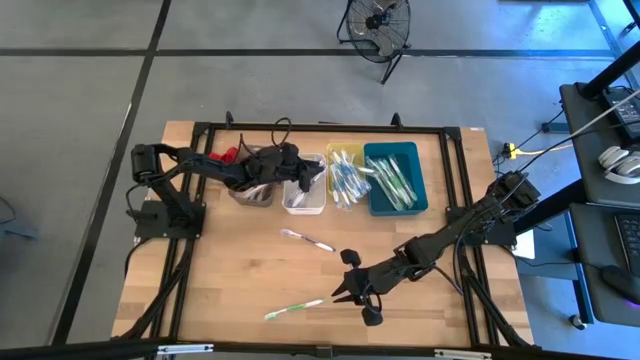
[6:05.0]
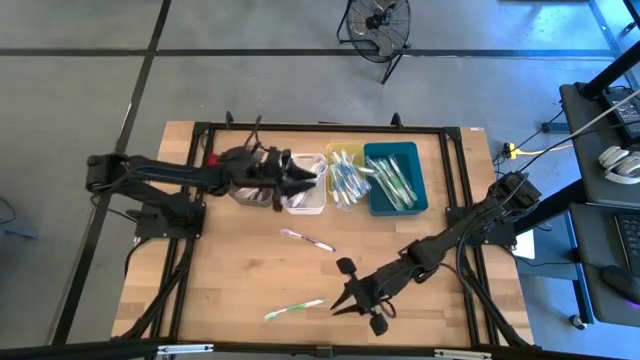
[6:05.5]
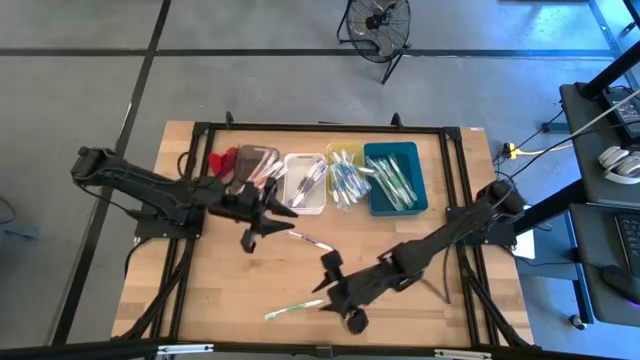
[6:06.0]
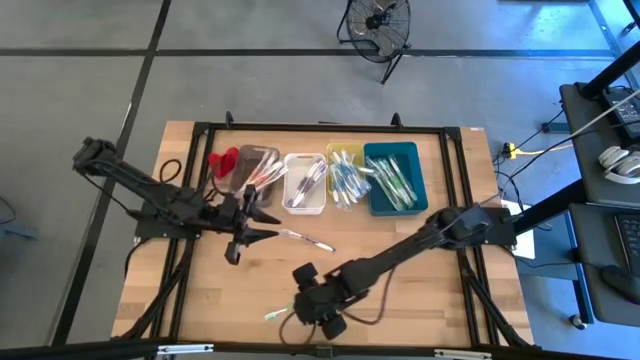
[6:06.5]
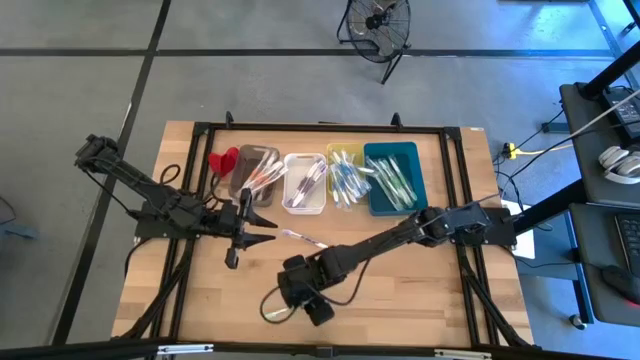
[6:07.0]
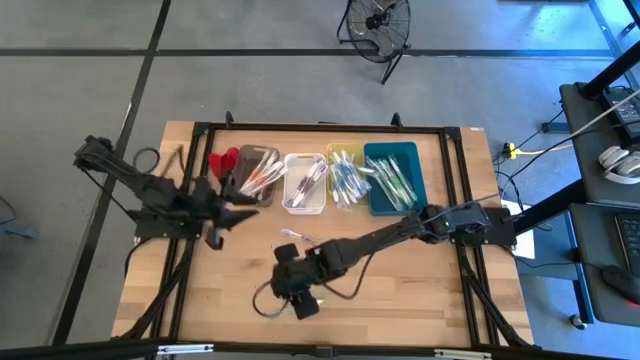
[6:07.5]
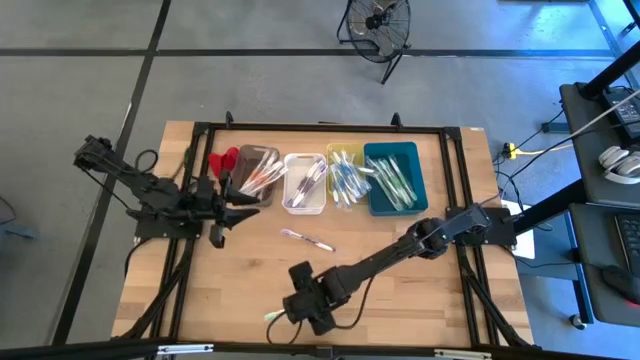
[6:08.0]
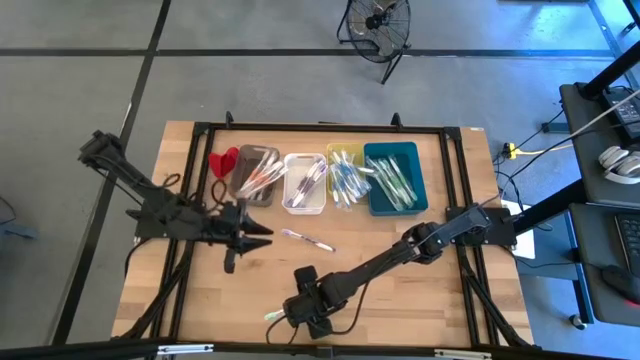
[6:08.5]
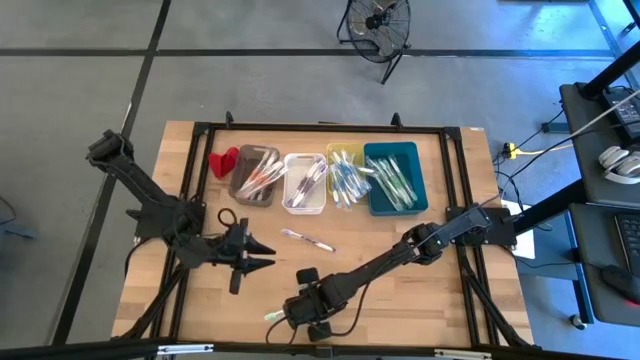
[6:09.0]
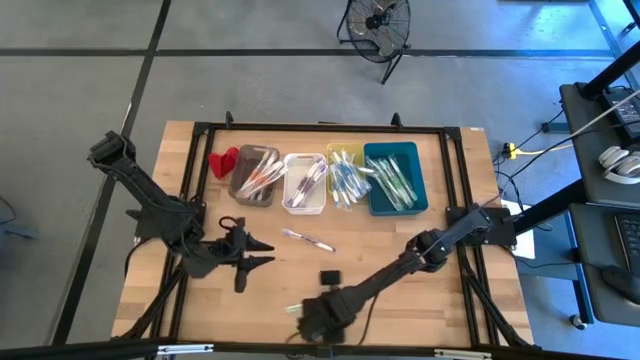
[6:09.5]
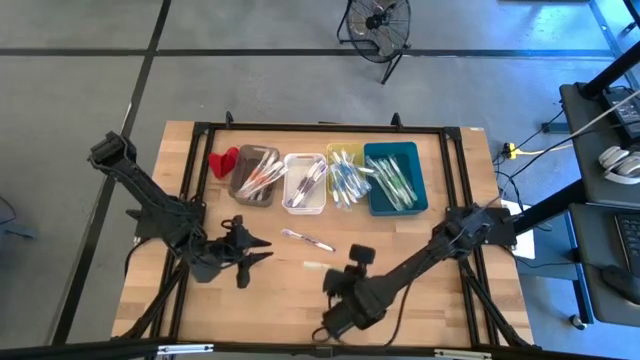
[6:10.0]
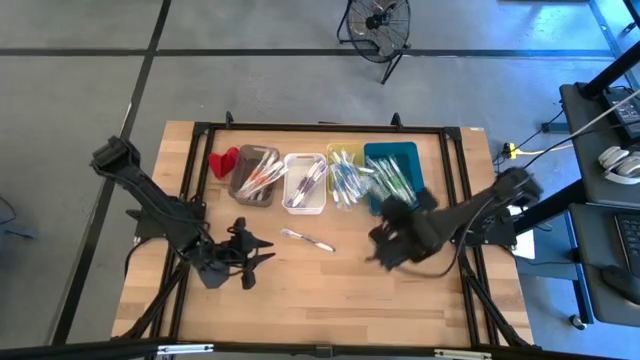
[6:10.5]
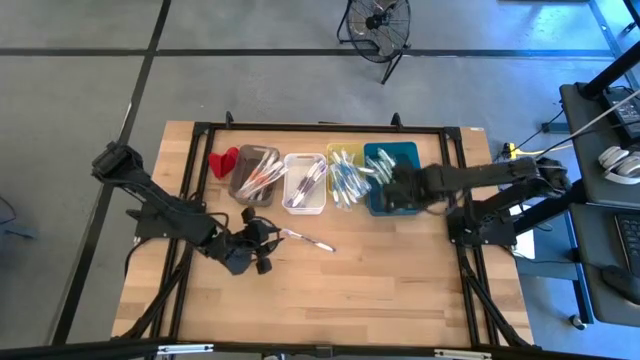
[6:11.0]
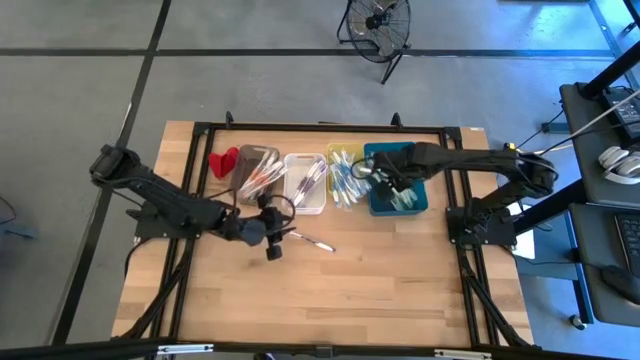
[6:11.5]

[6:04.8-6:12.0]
Task: Pick & Place Toothbrushes
Put the green toothbrush into the blue bin

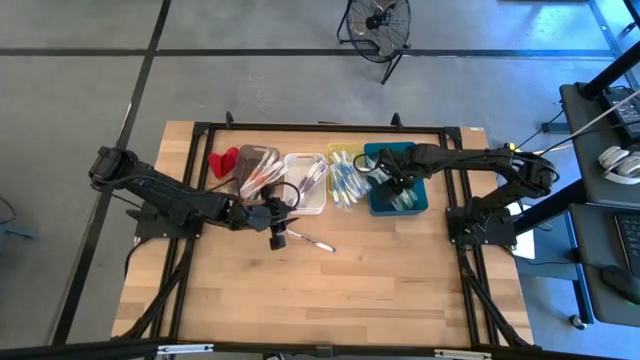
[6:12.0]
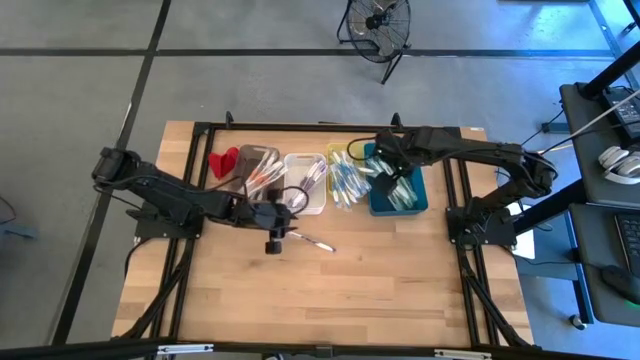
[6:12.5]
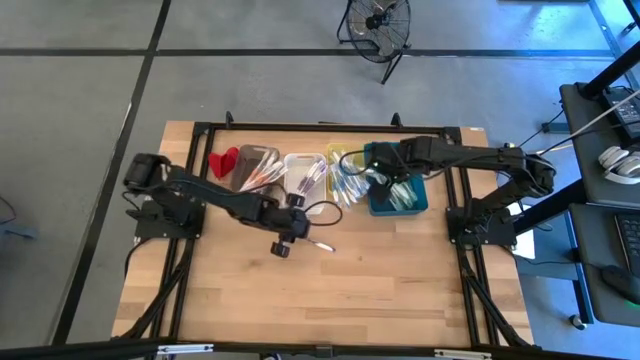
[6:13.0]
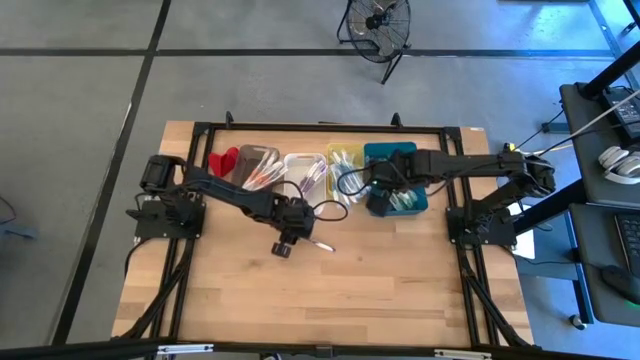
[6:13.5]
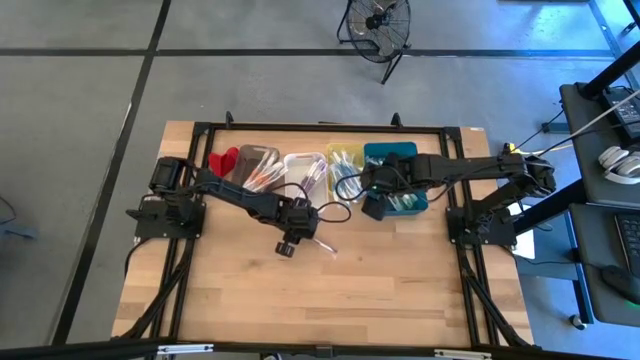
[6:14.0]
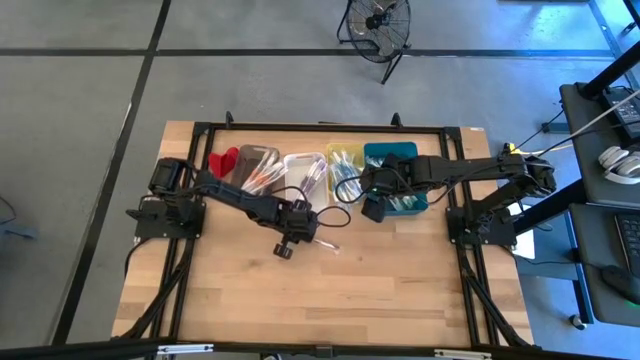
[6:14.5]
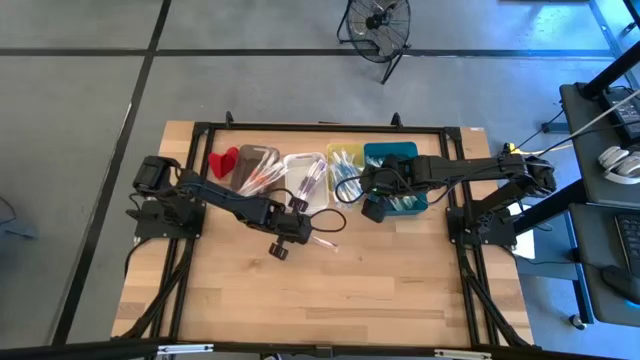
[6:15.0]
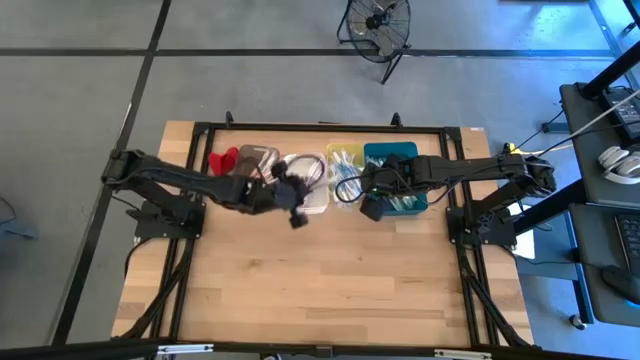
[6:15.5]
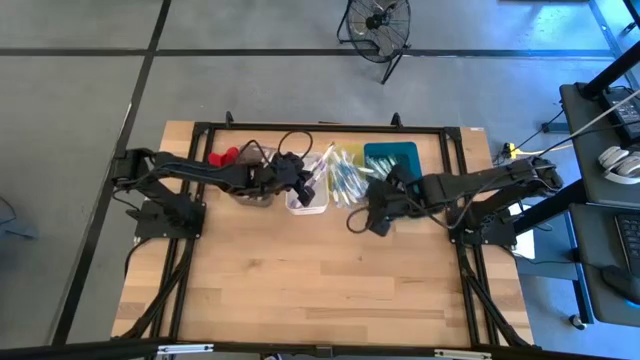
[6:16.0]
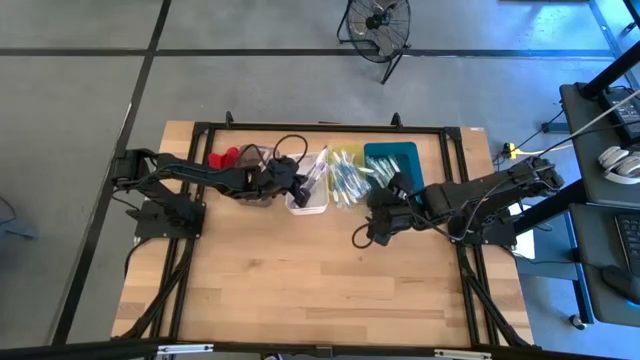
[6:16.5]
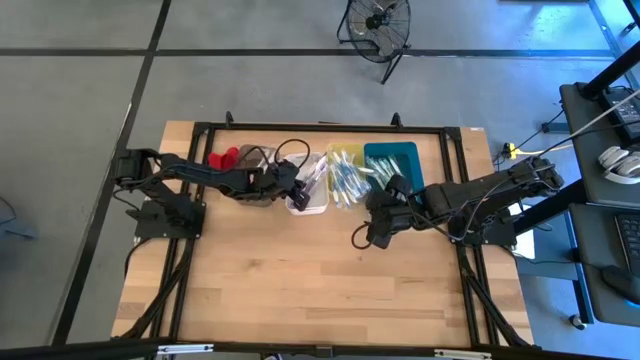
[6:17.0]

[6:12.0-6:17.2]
Put the purple toothbrush into the white bin

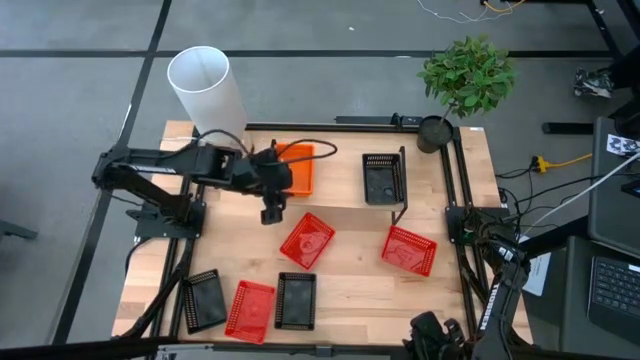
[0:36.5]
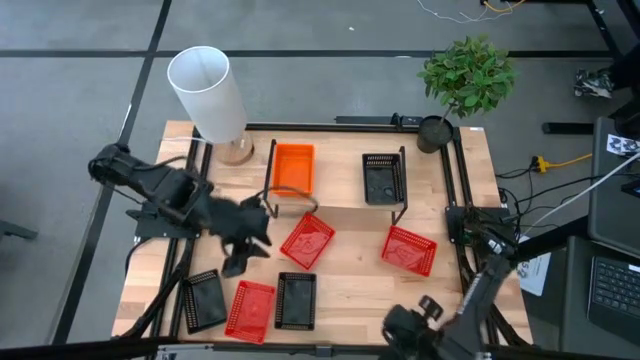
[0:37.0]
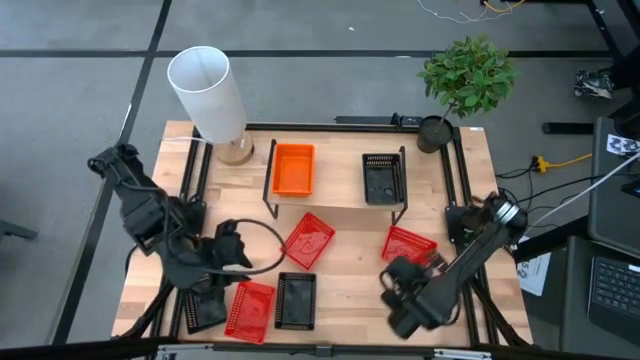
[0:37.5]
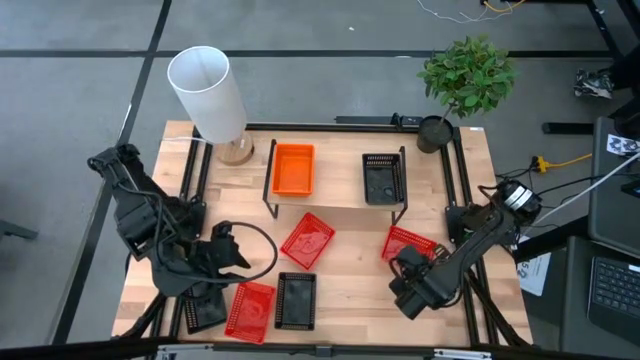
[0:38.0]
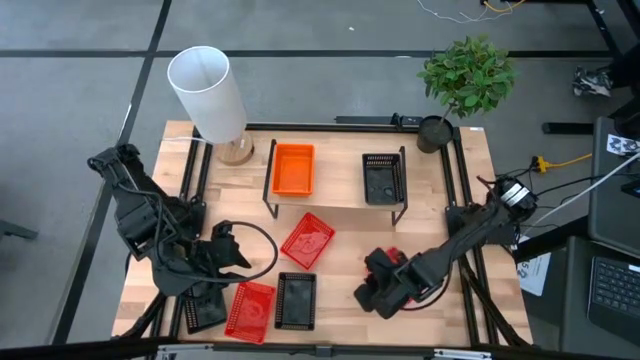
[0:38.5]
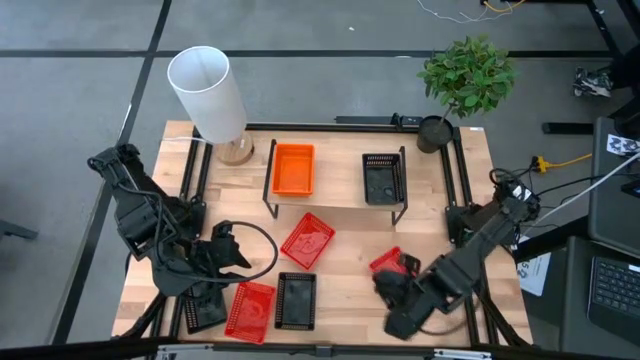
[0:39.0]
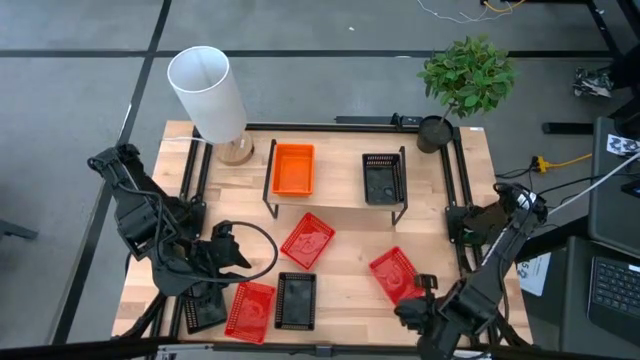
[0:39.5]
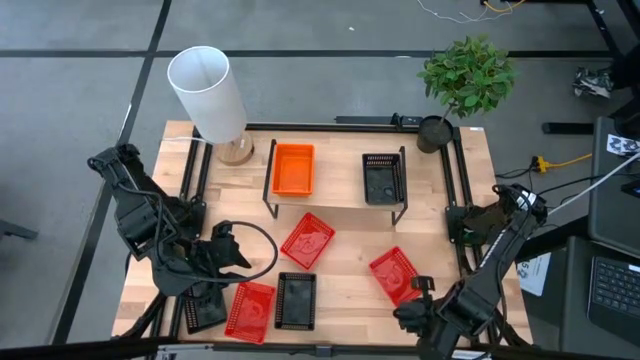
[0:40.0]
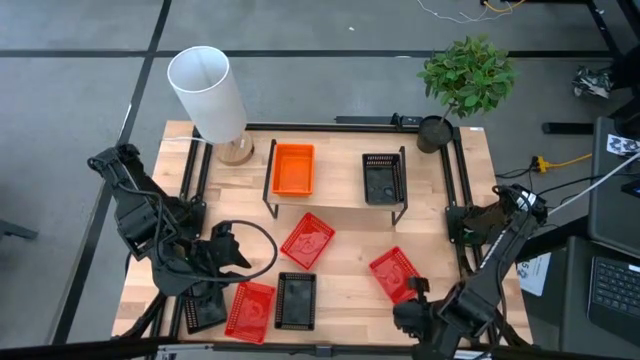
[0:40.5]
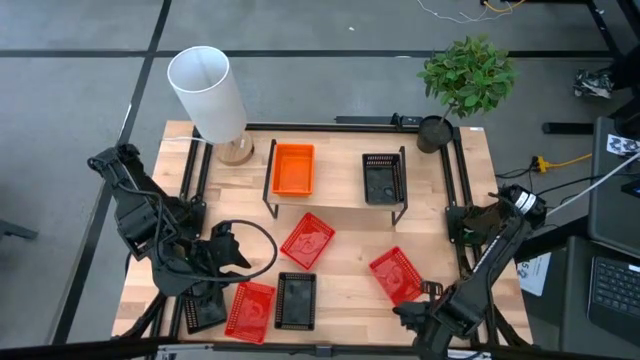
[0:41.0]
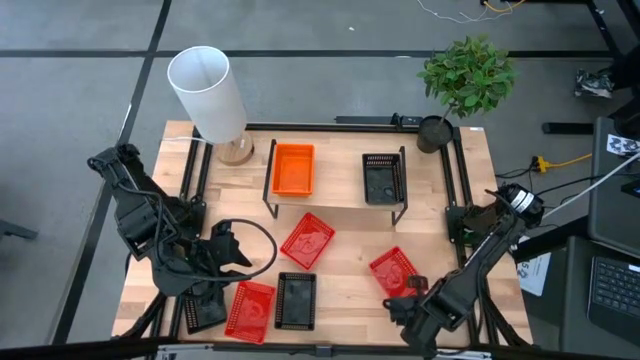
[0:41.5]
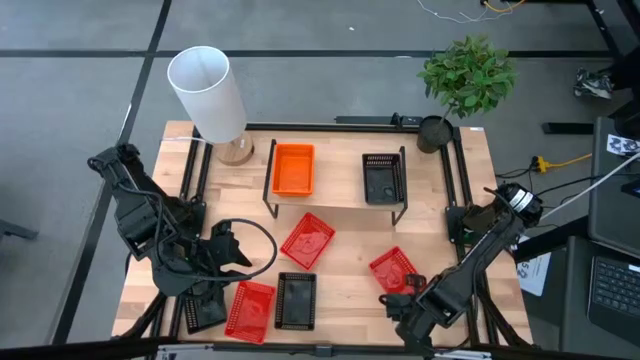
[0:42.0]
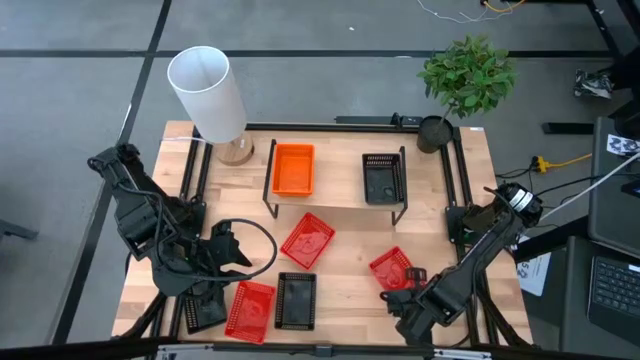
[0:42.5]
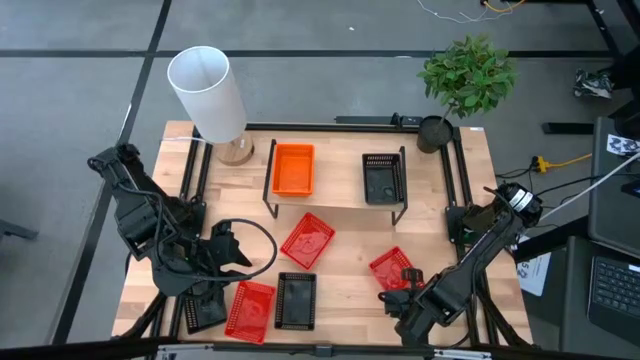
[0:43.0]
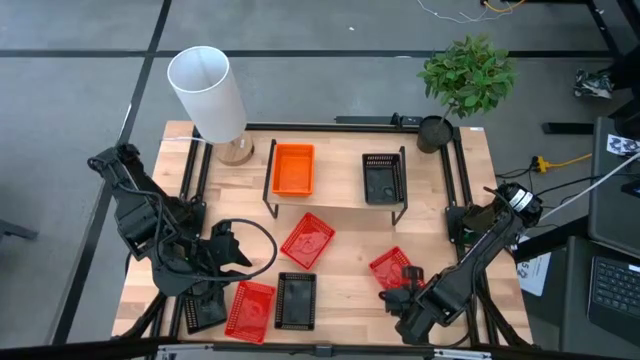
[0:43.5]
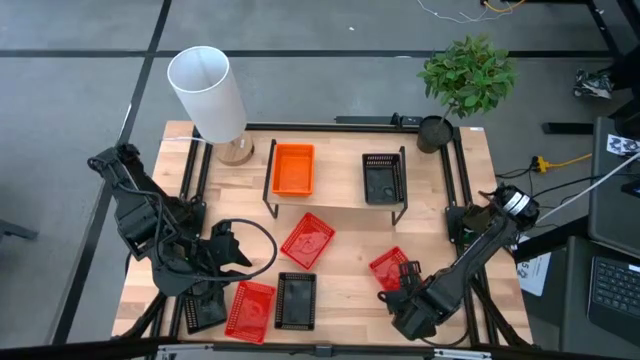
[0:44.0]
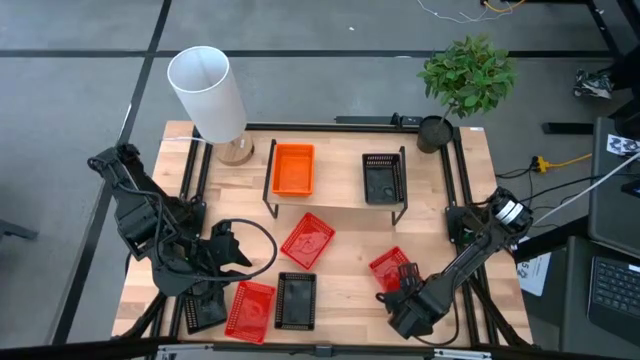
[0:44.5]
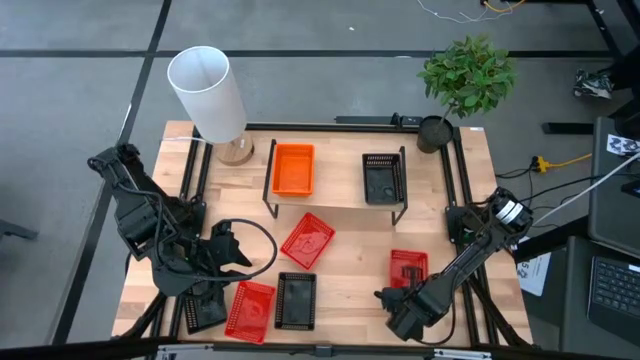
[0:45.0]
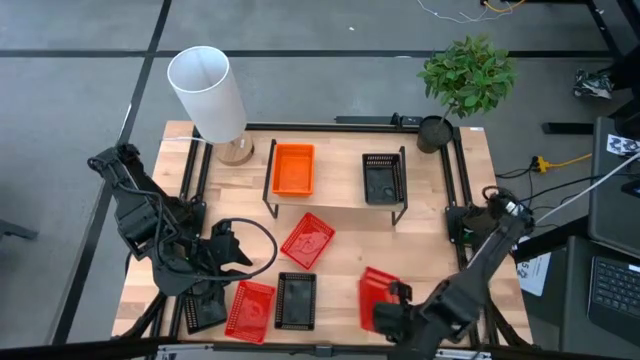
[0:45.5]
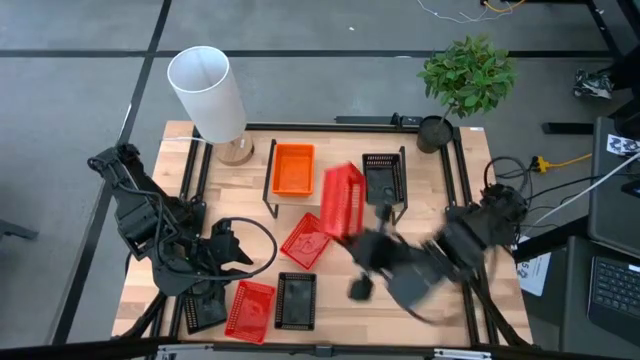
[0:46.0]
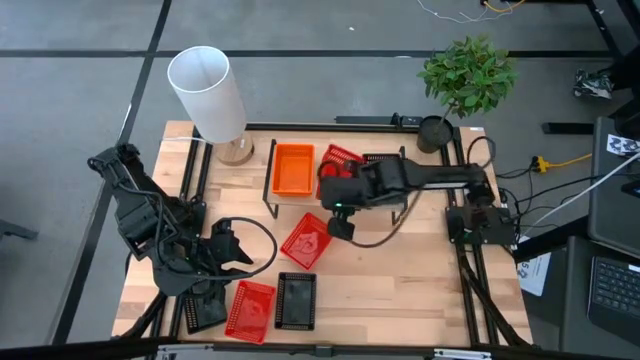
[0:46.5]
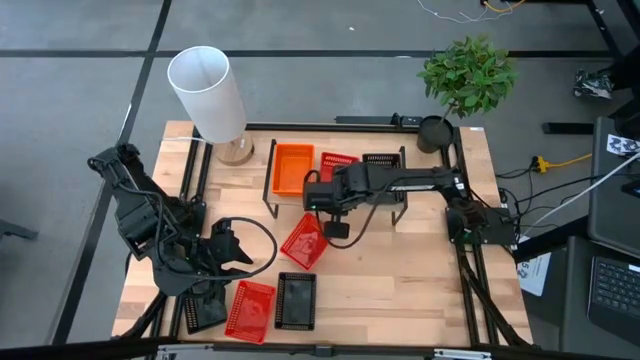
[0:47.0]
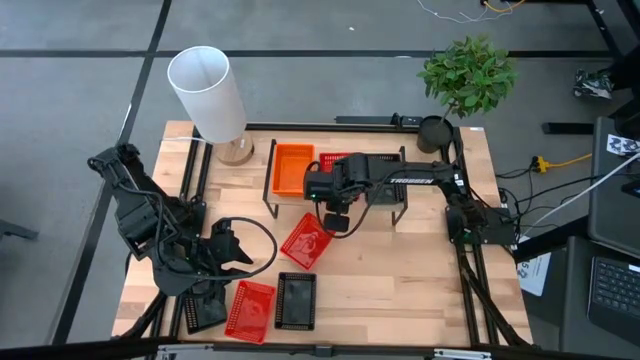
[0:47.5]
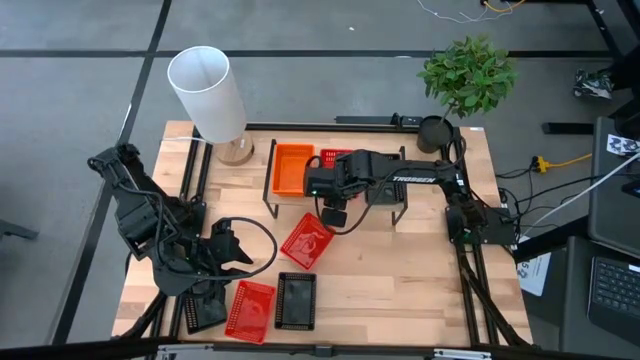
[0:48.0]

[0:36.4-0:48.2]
Task: Stack baskets on shelf by color
Put the right red bin on the shelf
